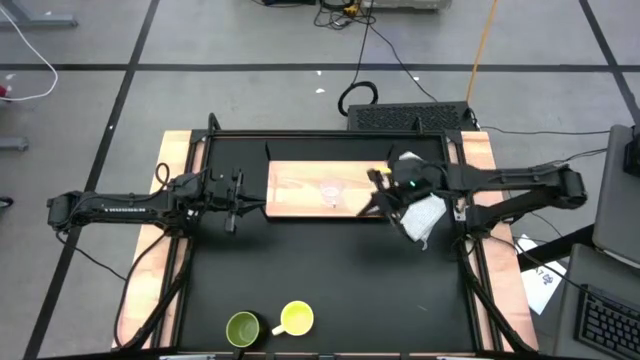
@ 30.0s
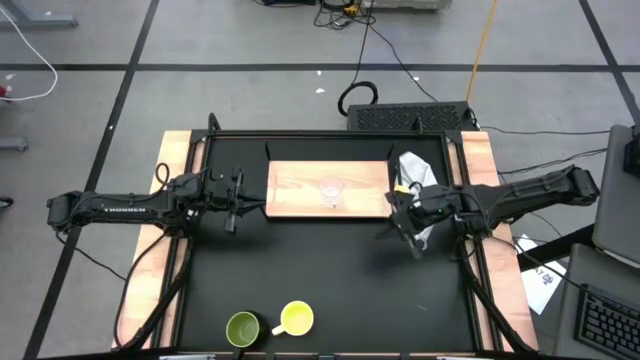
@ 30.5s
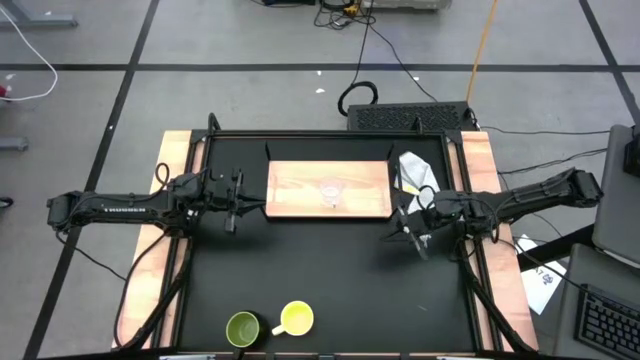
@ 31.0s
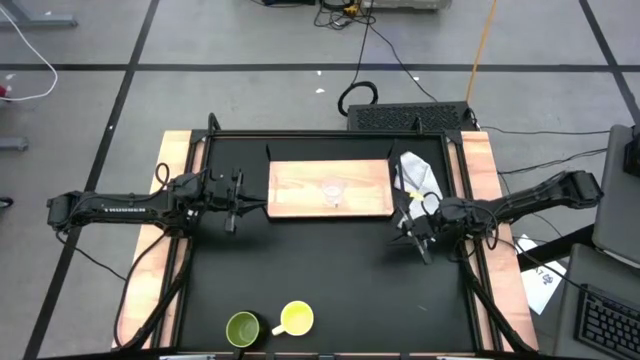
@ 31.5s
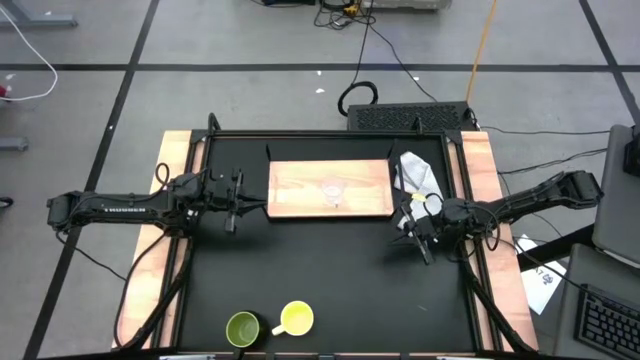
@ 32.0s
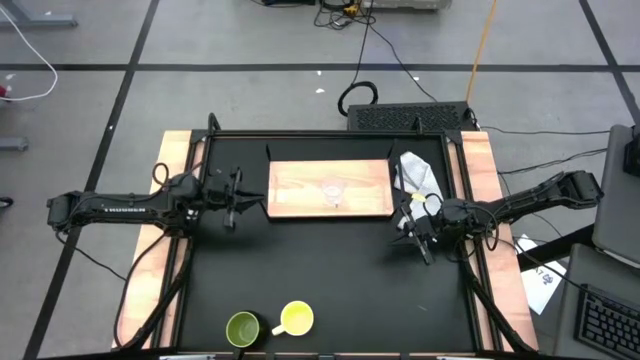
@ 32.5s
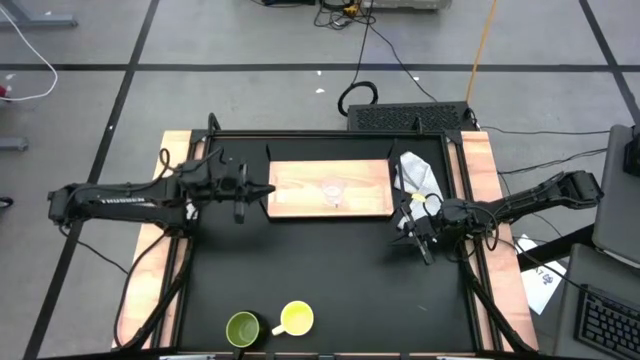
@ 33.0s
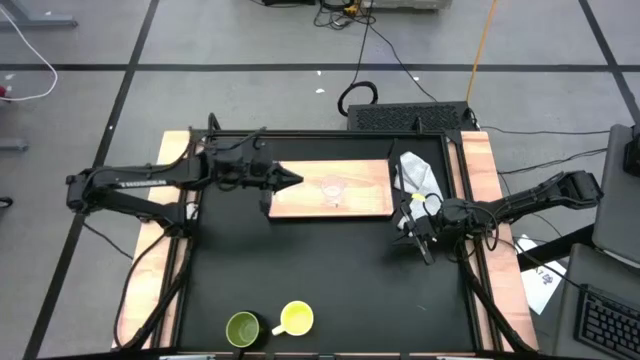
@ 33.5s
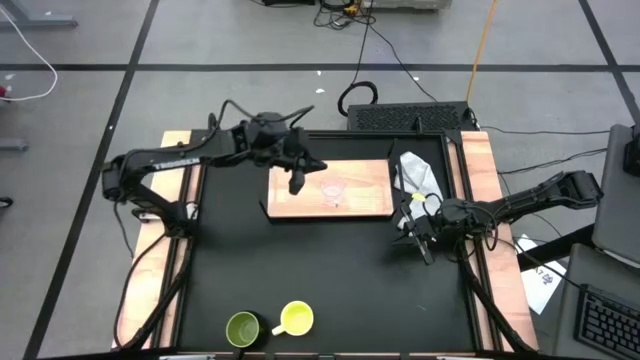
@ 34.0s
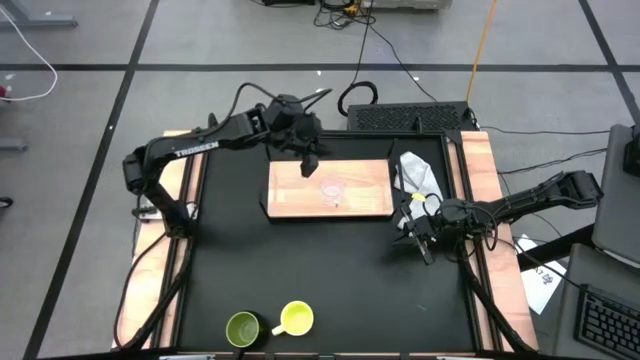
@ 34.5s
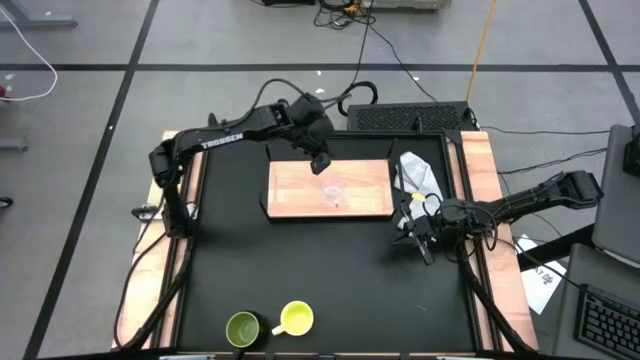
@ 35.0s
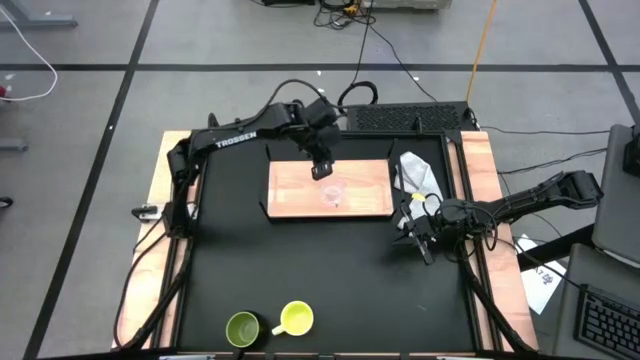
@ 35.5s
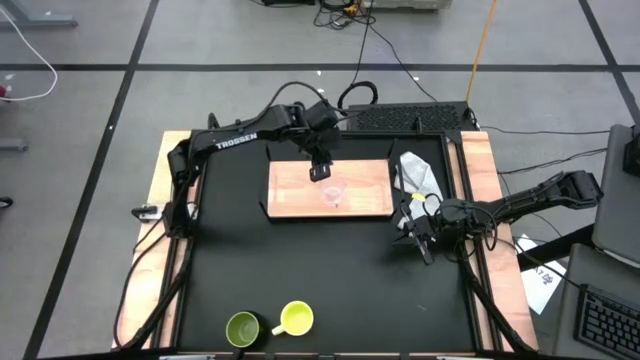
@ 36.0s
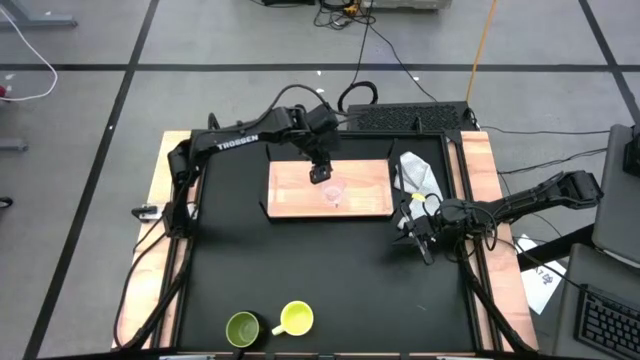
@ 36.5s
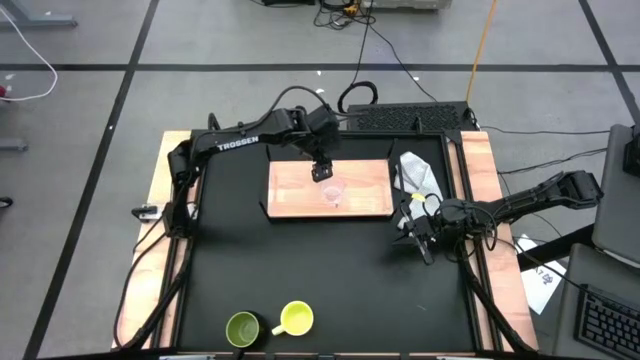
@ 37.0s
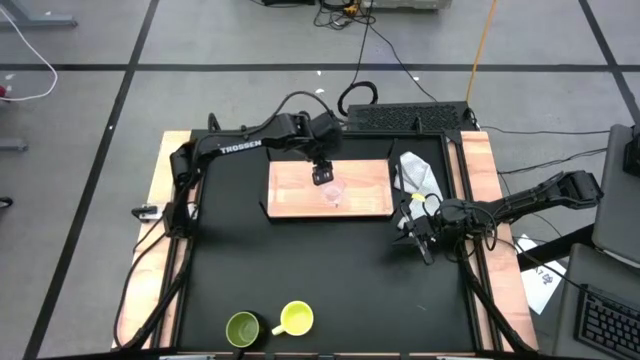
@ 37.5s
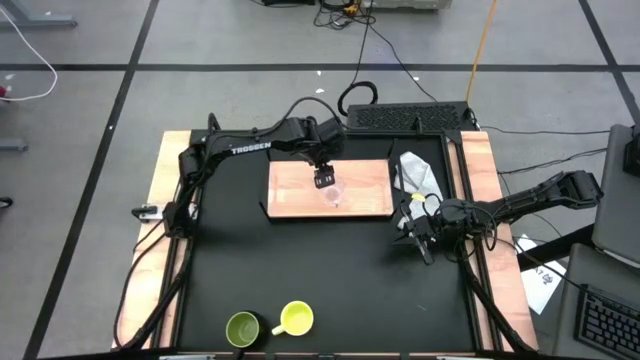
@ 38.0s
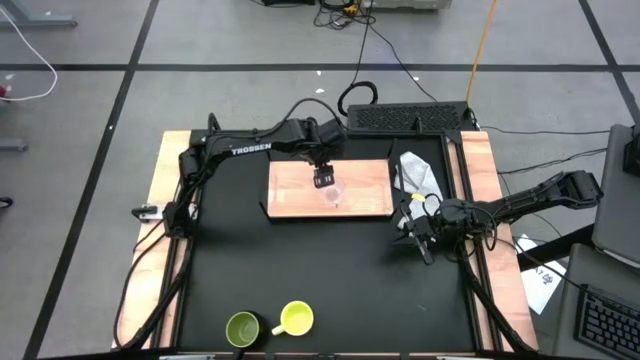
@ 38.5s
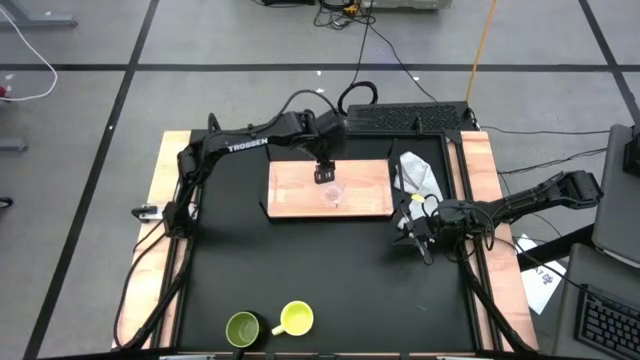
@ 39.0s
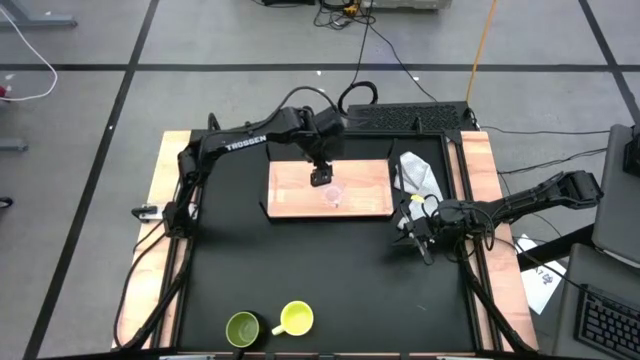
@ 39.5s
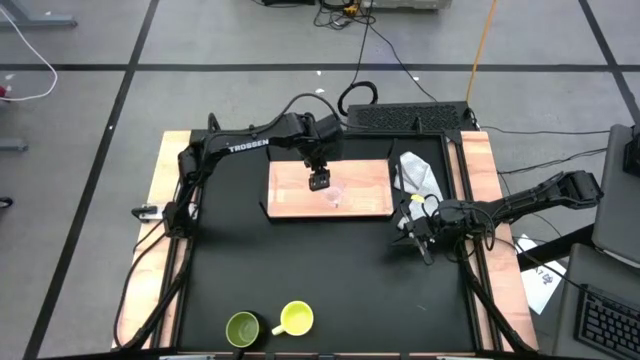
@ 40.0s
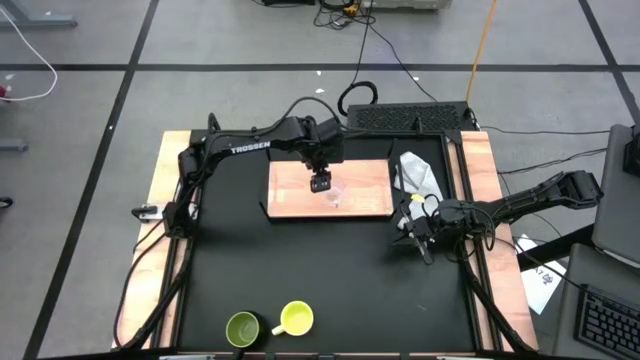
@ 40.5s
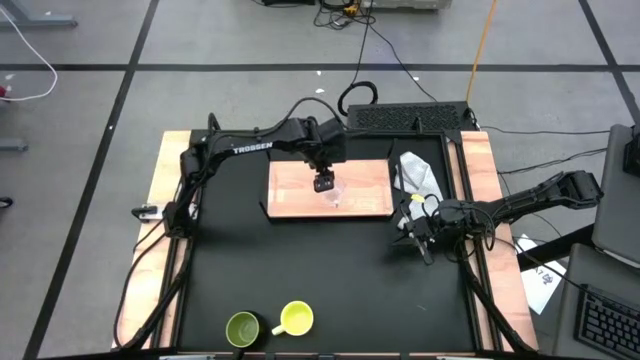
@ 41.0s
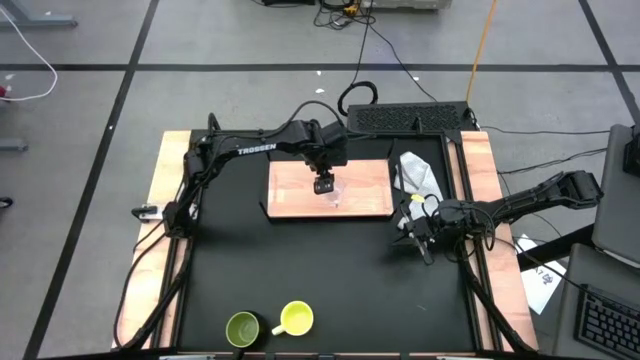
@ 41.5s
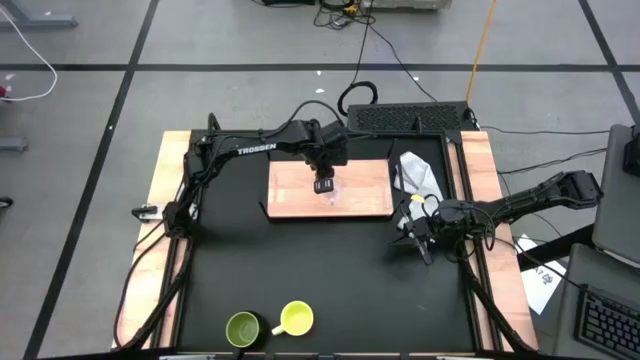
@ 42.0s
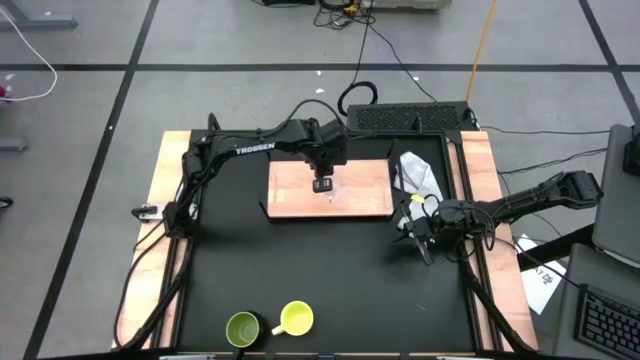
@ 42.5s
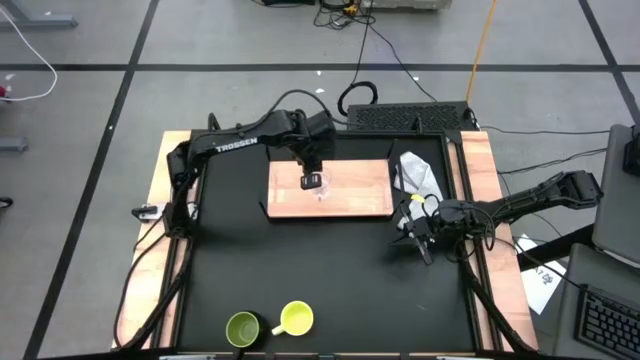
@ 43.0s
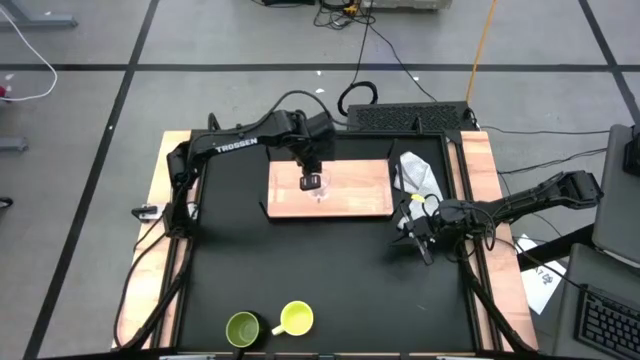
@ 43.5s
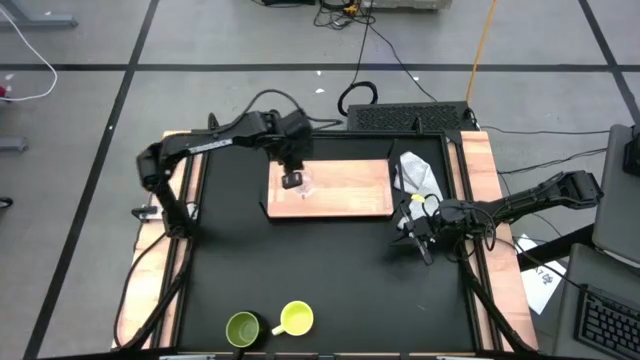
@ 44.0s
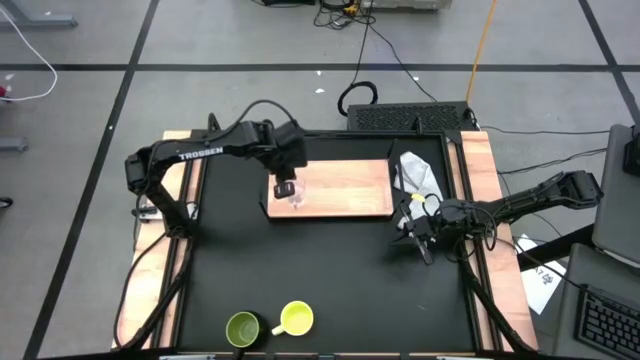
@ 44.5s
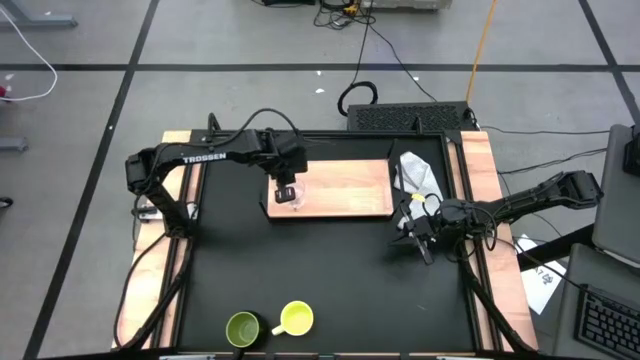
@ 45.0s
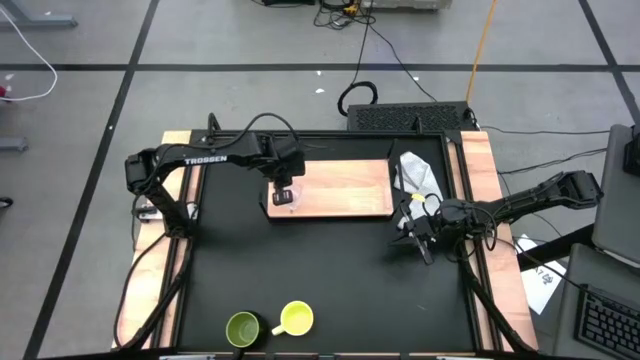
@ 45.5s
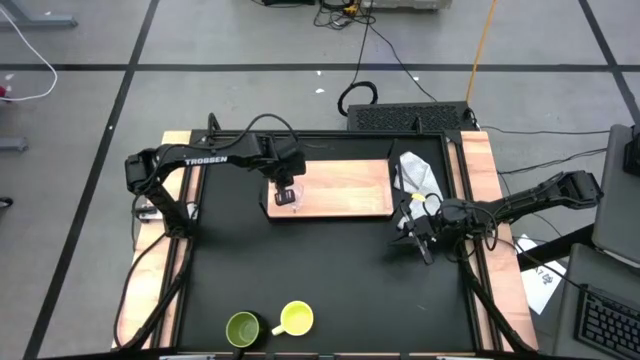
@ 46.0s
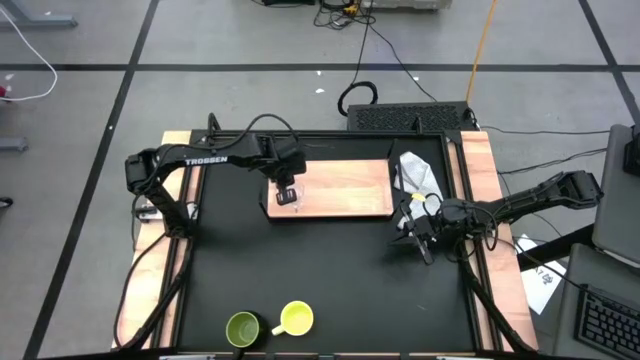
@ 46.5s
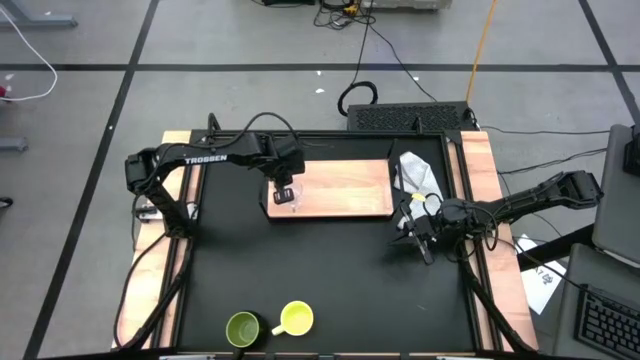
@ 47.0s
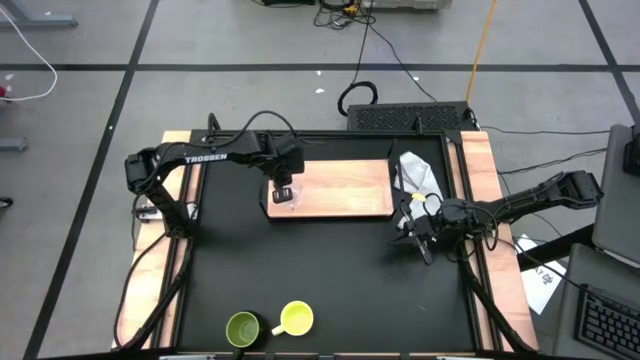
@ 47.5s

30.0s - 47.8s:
Task: Stack small to large cups/mugs on shelf
Put the transparent mug on the shelf

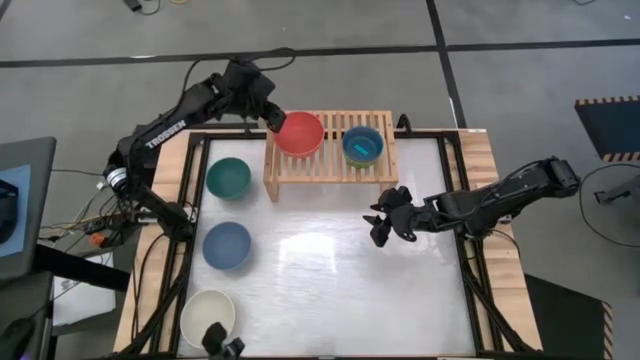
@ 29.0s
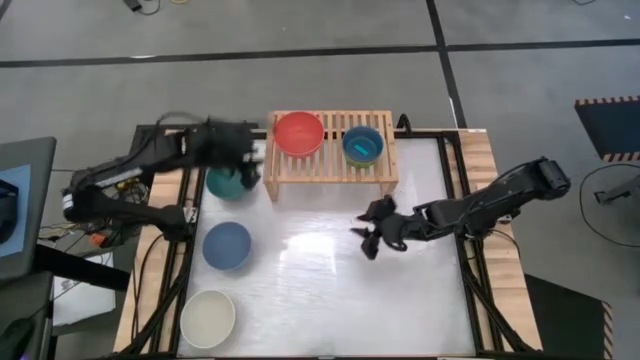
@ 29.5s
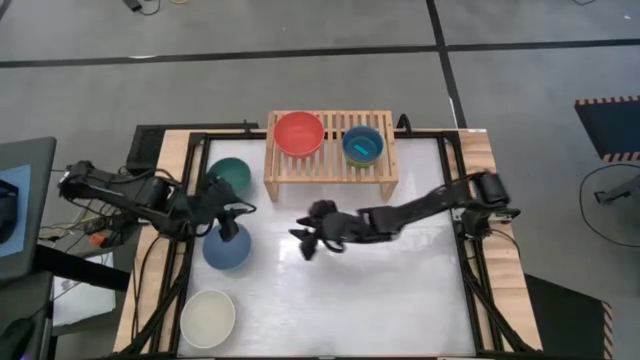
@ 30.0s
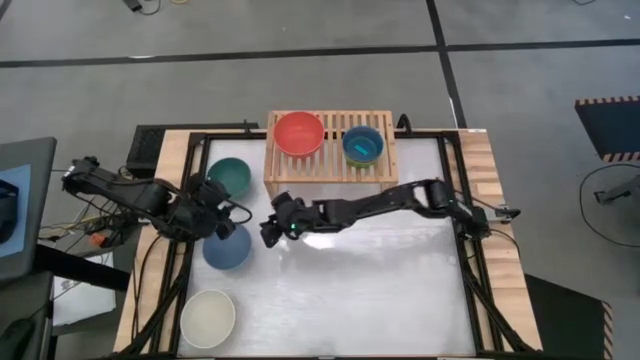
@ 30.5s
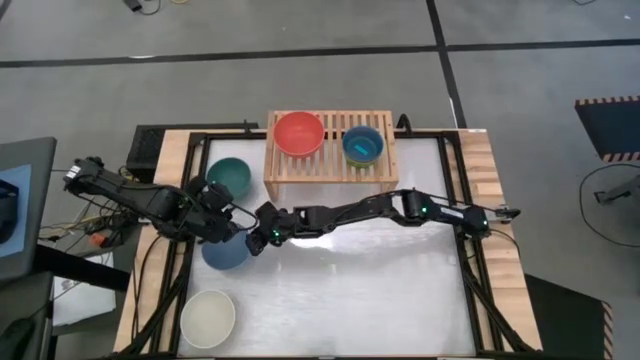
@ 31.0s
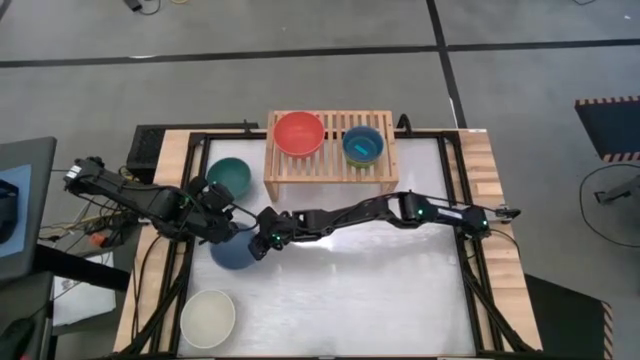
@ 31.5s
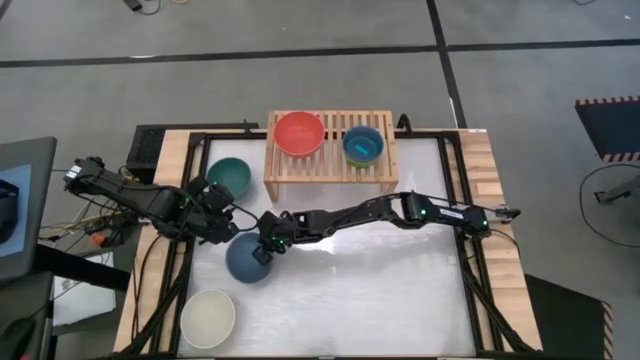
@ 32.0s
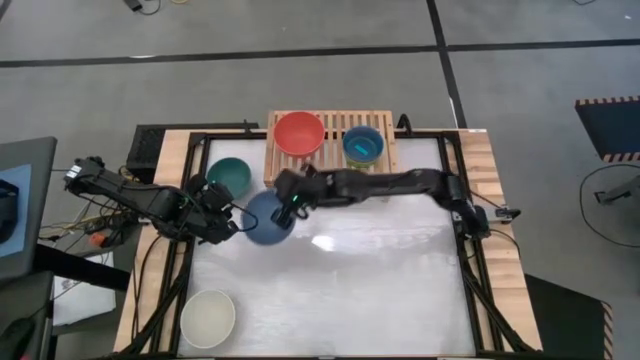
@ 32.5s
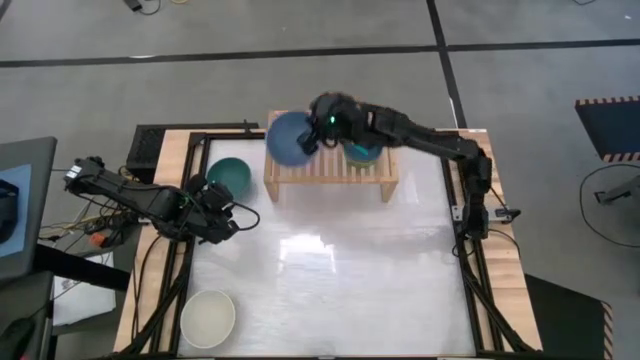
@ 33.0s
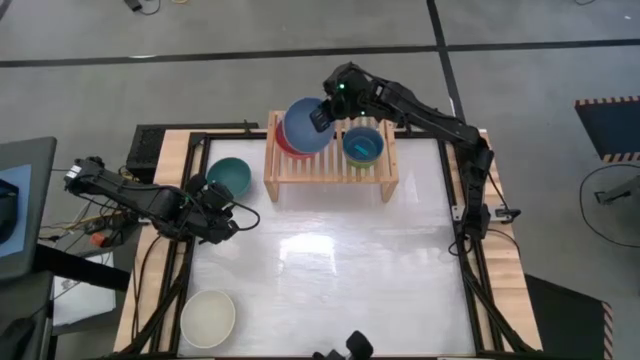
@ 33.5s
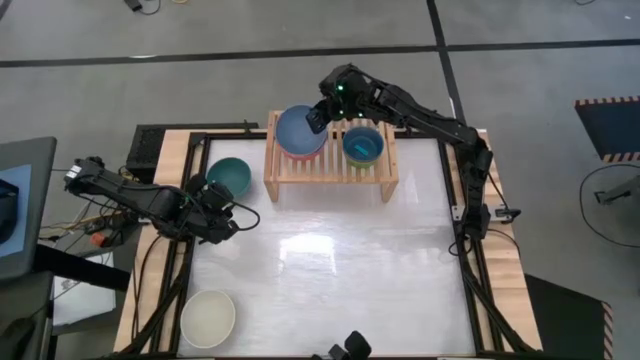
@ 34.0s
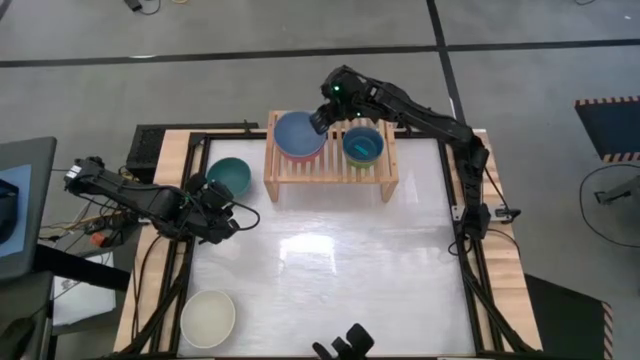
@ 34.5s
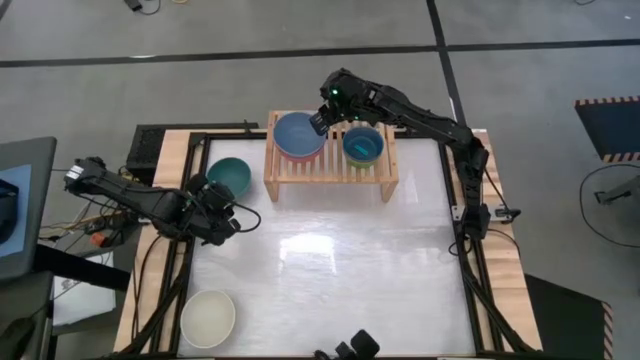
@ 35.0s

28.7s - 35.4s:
Task: Place and stack bowls onto a shelf
Stack the blue bowl on top of the orange bowl on the shelf
